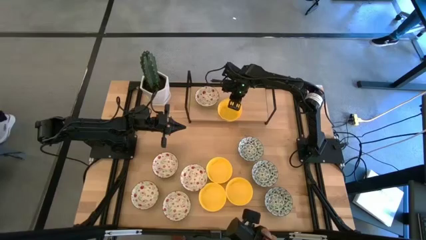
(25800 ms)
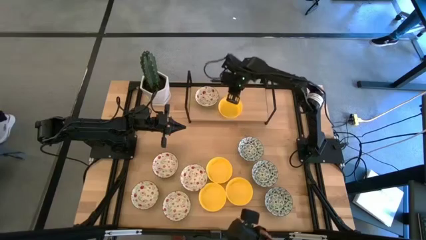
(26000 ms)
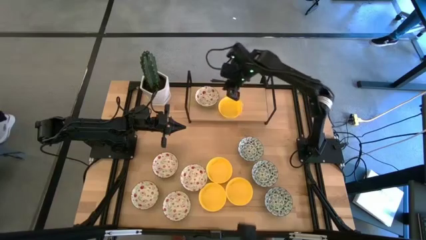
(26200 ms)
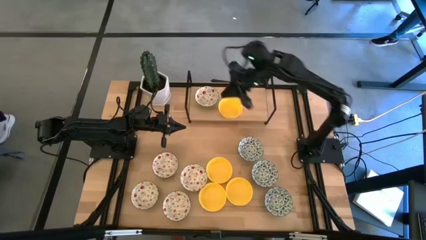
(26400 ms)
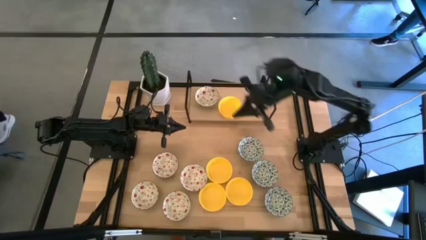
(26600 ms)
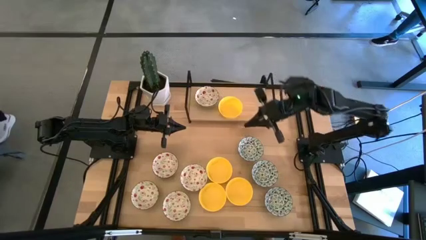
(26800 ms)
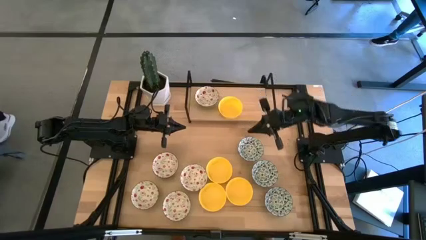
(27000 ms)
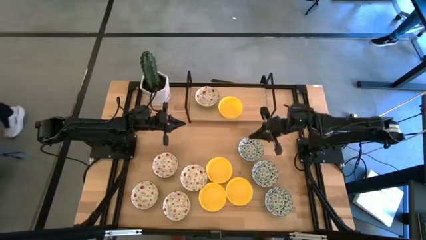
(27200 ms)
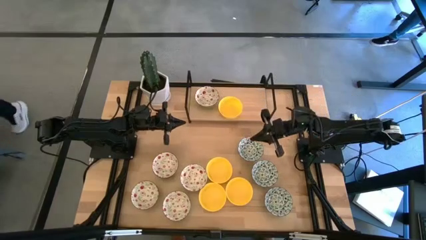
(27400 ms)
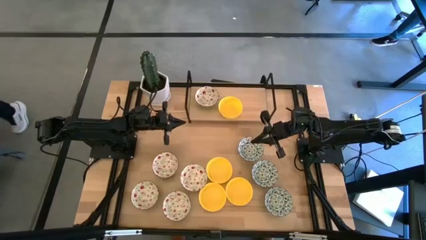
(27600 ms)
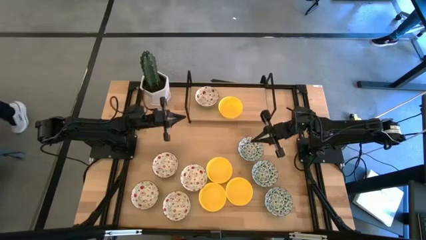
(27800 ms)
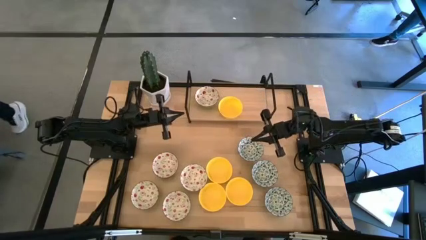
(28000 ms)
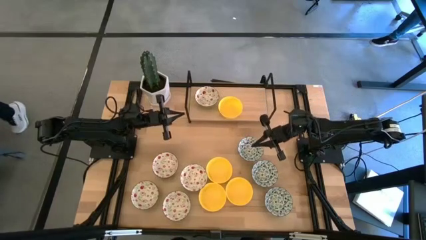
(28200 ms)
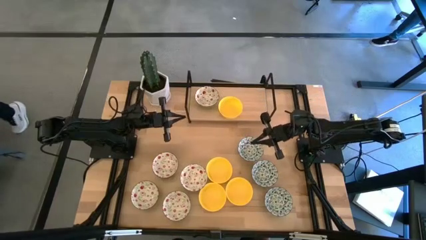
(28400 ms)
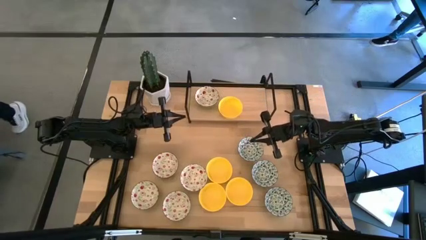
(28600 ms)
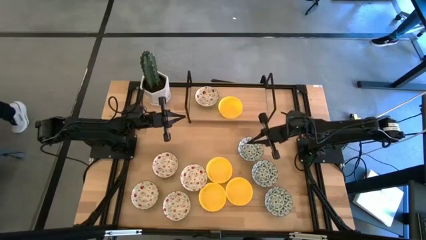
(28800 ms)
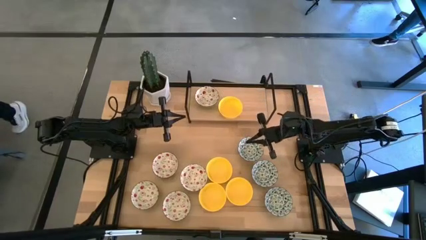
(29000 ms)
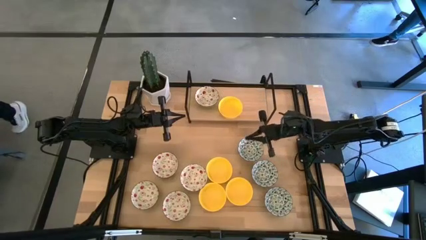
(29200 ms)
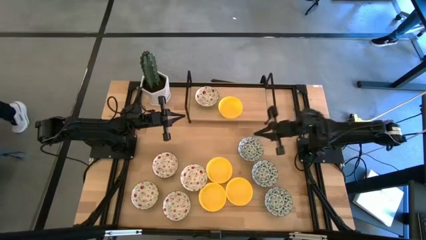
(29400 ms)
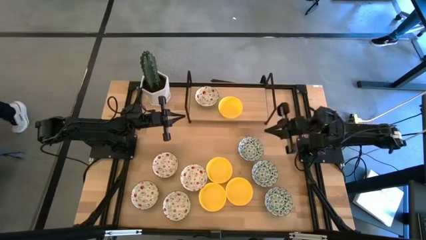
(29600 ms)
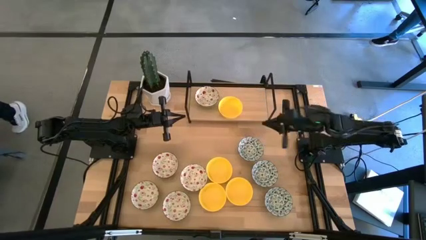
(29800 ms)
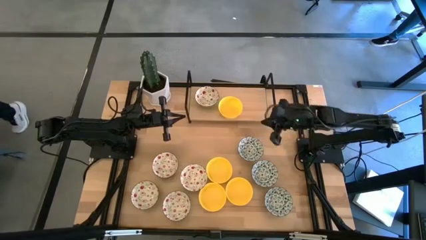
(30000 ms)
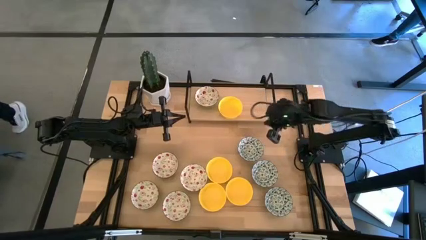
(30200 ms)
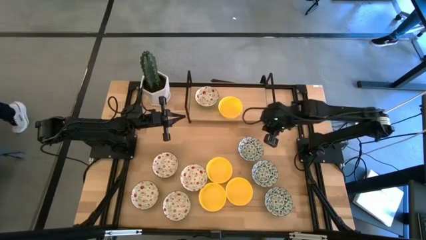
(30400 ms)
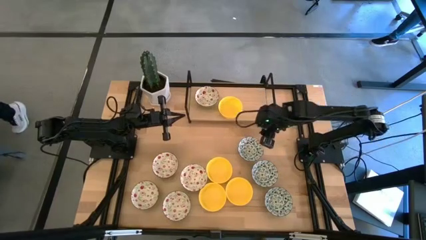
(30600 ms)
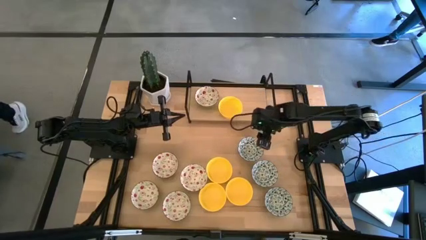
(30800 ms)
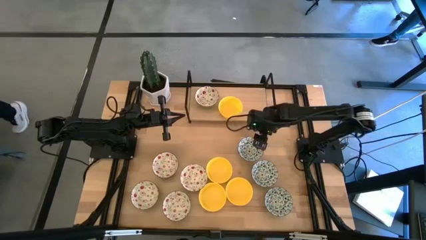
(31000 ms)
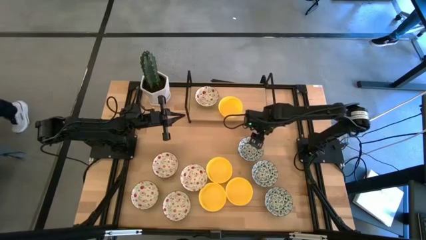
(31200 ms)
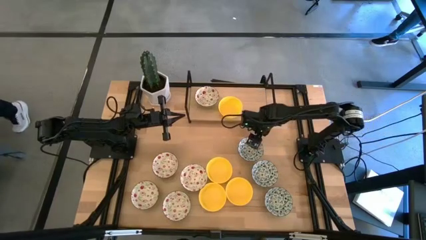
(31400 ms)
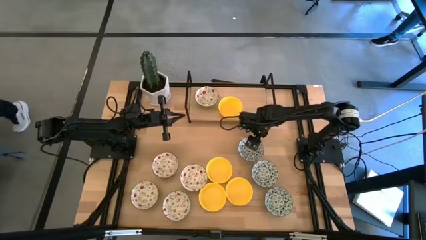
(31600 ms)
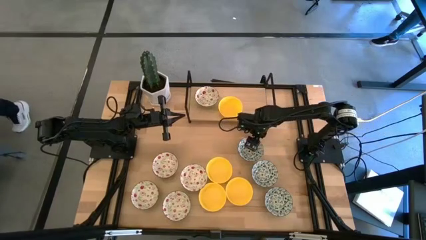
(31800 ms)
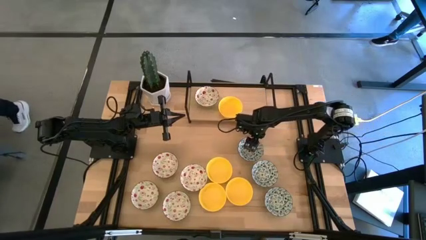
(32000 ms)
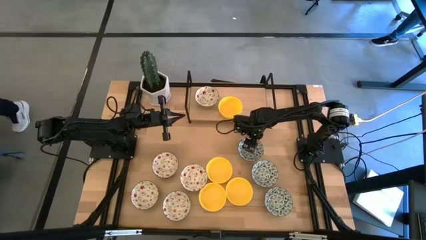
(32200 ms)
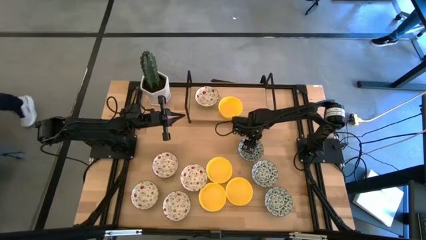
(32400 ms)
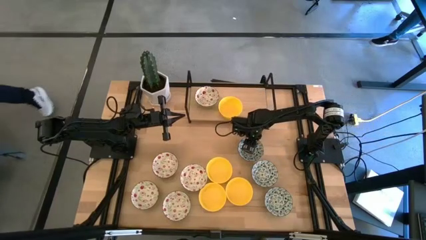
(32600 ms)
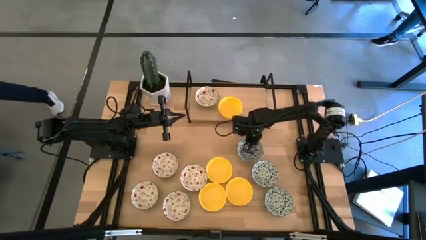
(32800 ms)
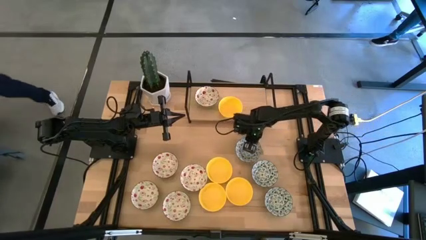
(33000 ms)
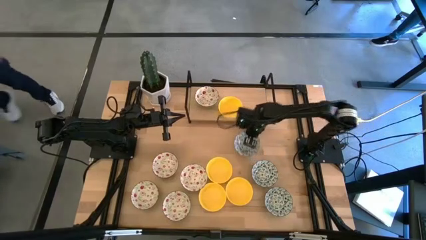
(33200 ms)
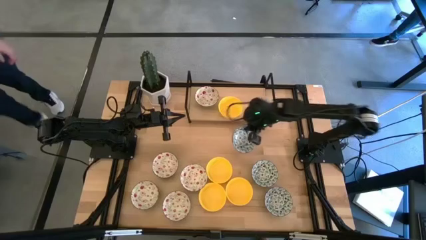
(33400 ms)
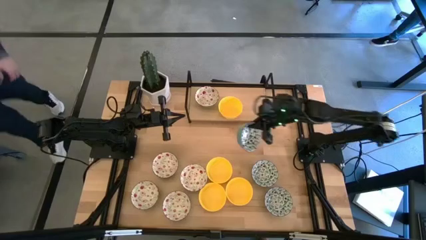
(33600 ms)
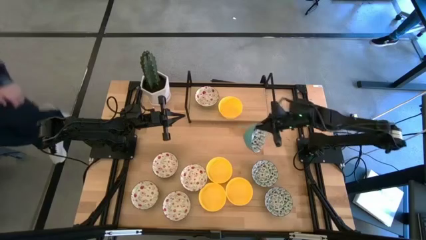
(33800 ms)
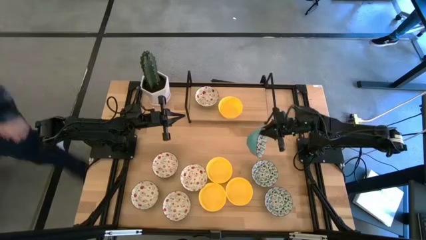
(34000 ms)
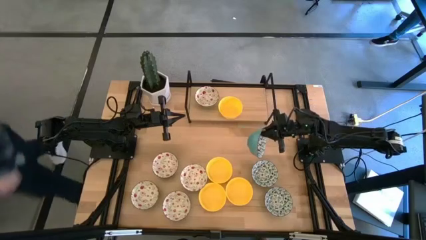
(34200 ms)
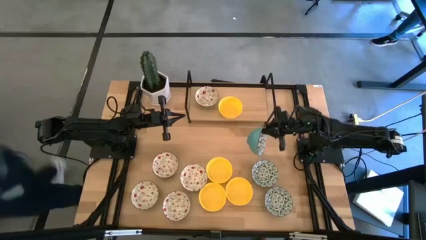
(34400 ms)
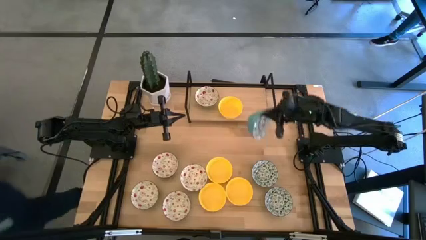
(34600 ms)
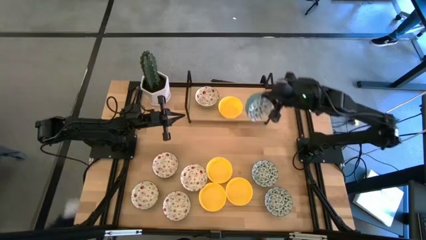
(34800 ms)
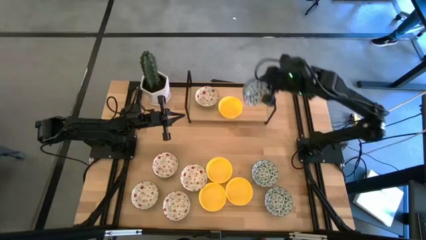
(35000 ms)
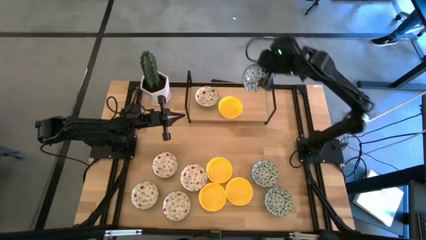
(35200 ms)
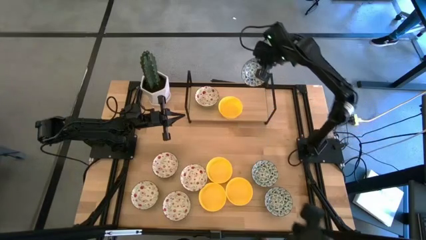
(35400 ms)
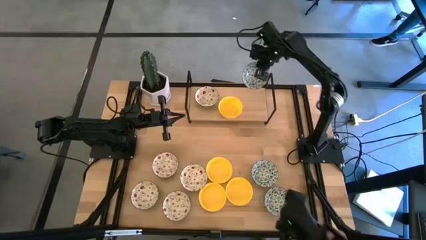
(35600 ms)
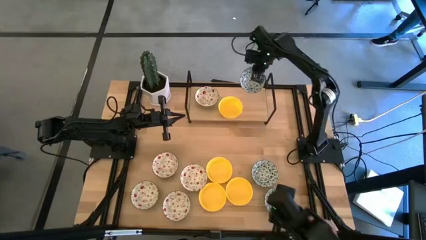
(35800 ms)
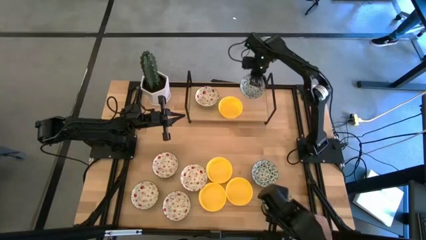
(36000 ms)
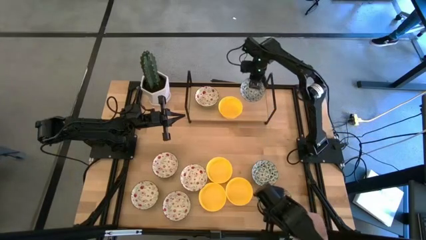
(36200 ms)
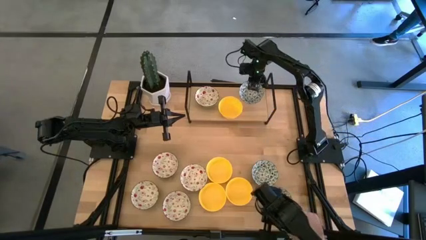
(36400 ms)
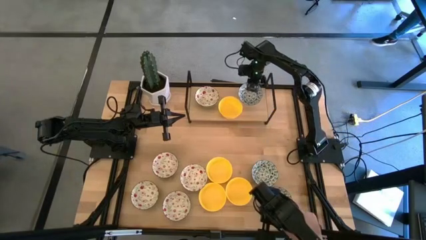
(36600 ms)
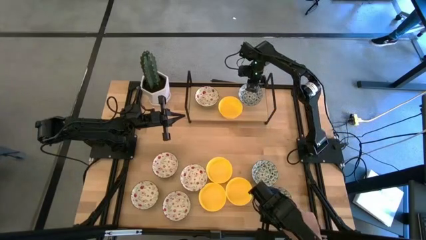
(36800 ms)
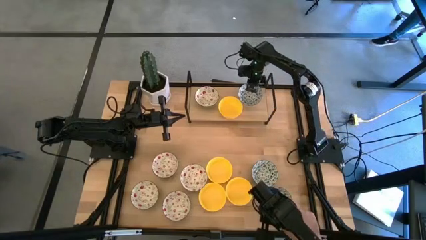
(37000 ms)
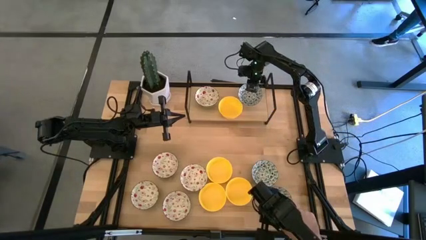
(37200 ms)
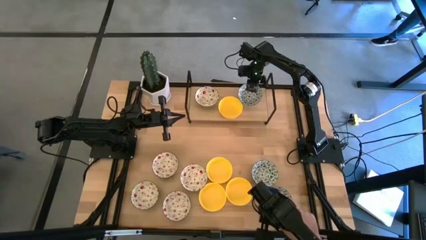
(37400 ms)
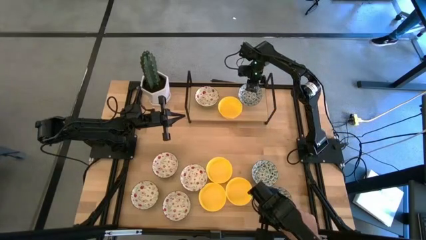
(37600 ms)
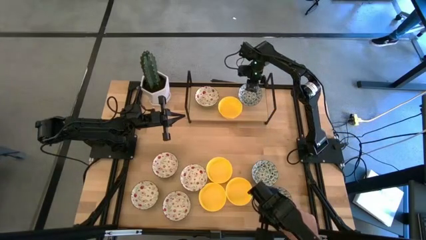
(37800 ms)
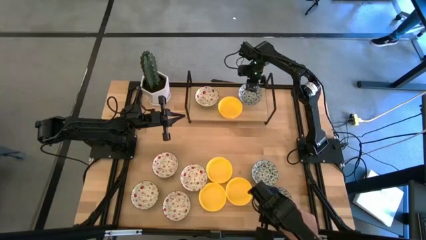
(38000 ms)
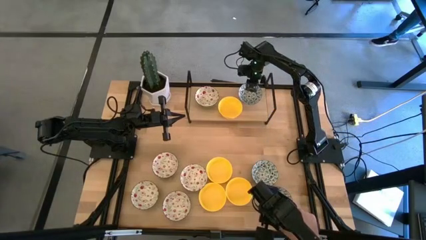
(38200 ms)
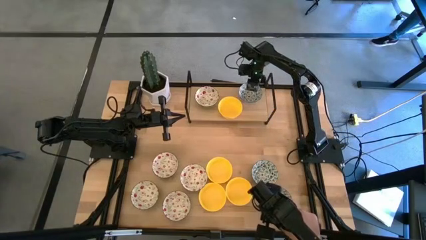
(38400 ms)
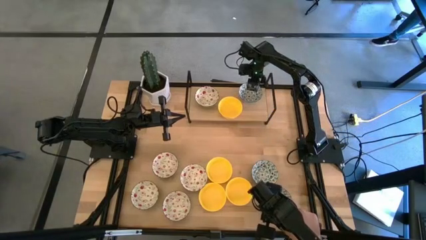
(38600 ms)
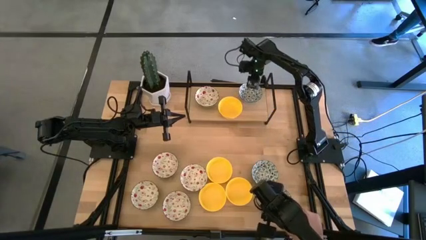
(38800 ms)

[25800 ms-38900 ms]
Task: Pick & Place Mini bowls
Put the blue black bowl on the shelf
